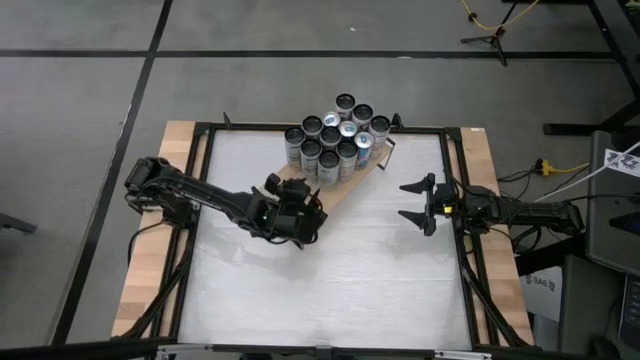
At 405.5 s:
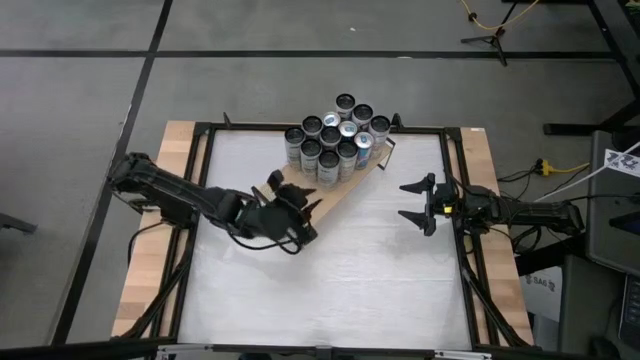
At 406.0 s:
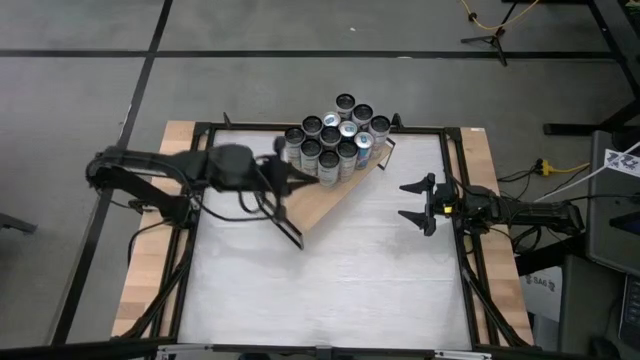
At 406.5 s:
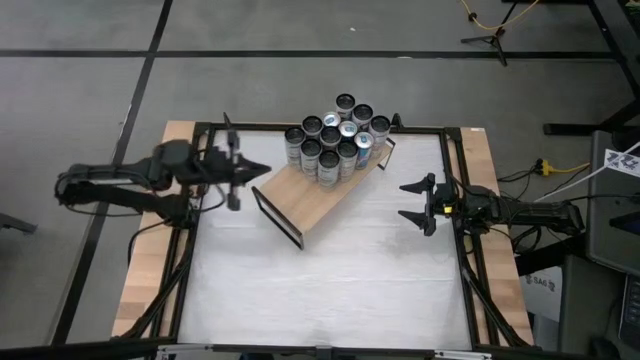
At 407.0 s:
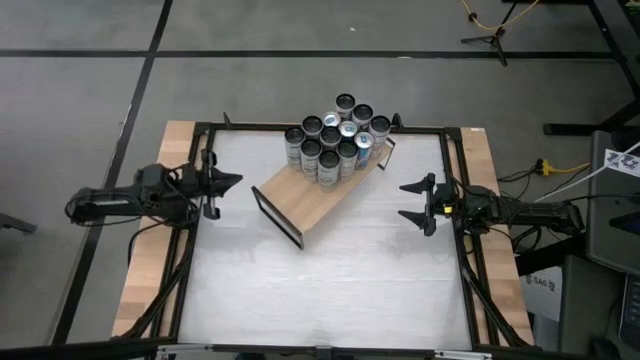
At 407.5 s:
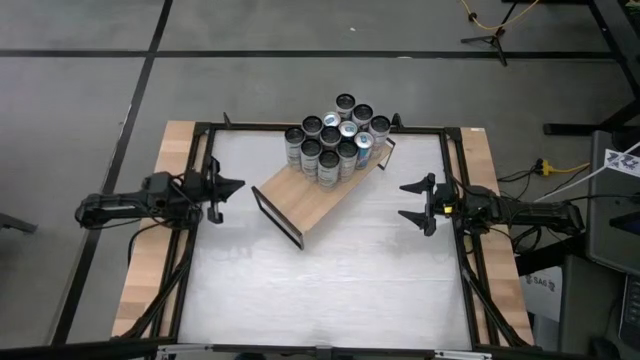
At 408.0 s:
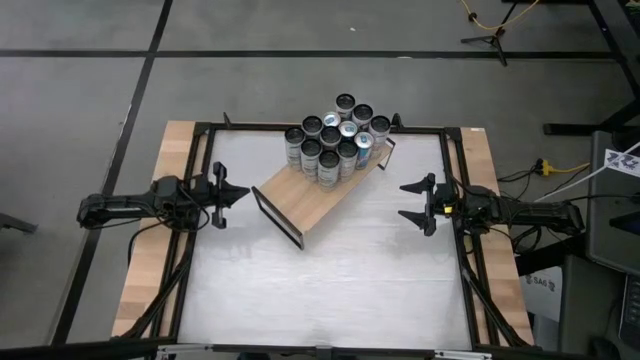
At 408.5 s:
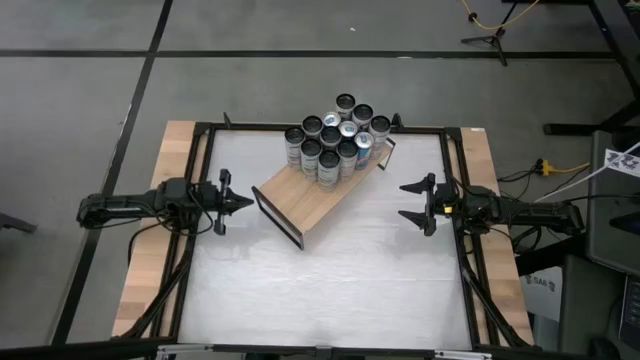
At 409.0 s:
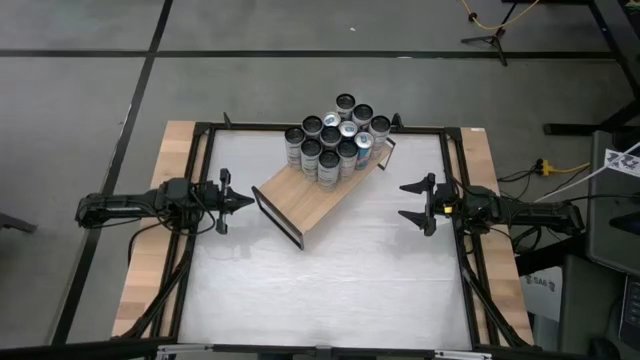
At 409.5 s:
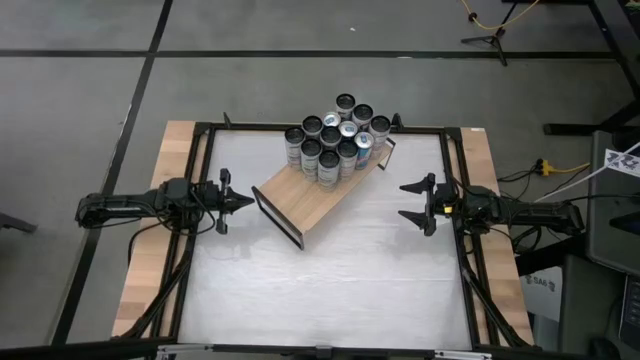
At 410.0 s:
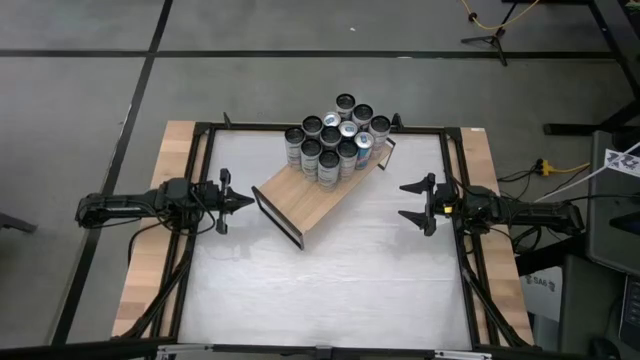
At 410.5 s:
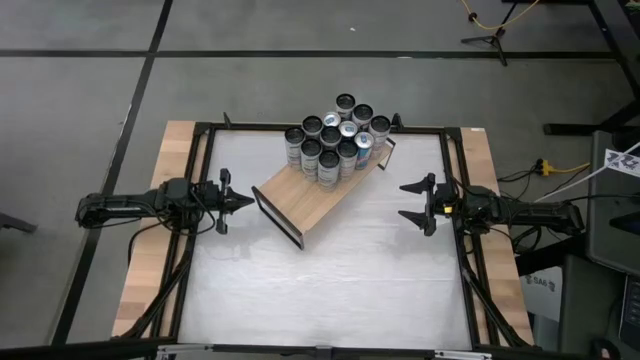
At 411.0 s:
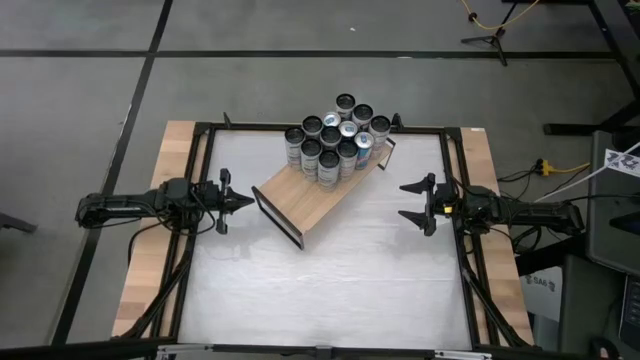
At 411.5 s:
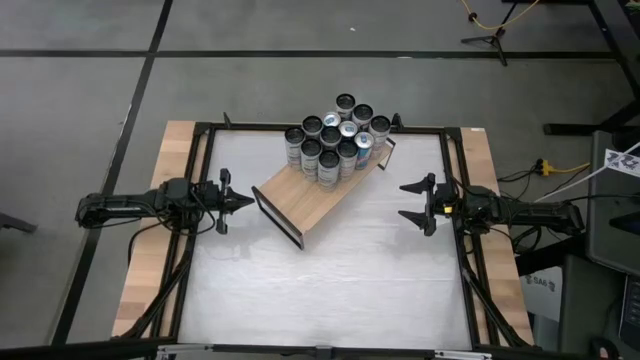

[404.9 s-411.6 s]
Task: Place canned beverage on shelf
Return to Home Position

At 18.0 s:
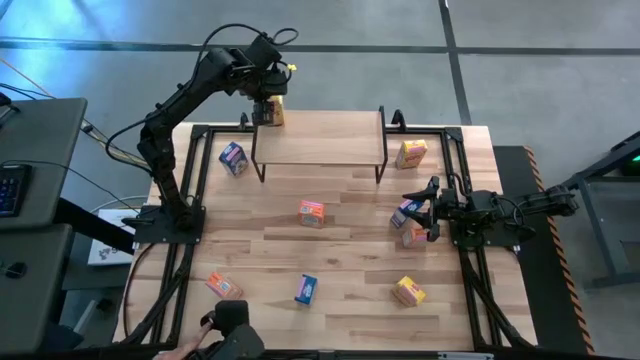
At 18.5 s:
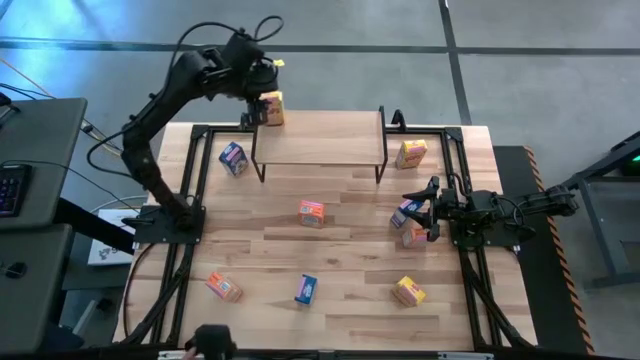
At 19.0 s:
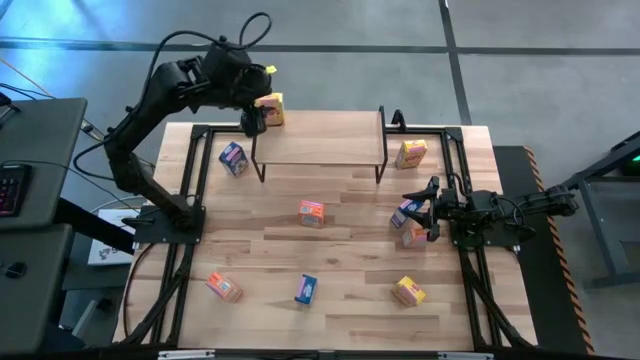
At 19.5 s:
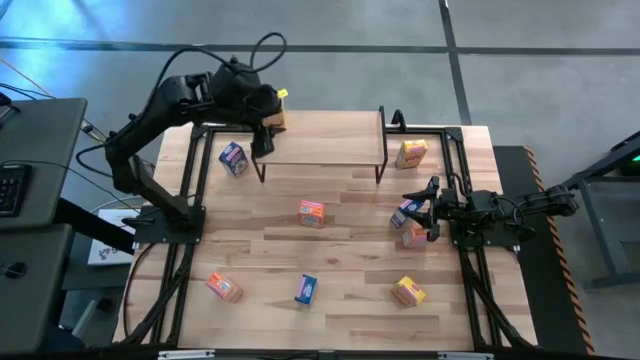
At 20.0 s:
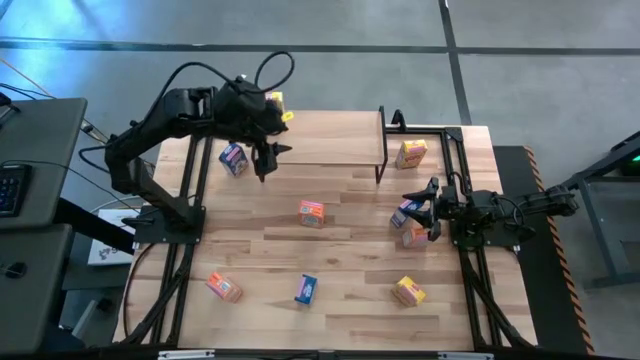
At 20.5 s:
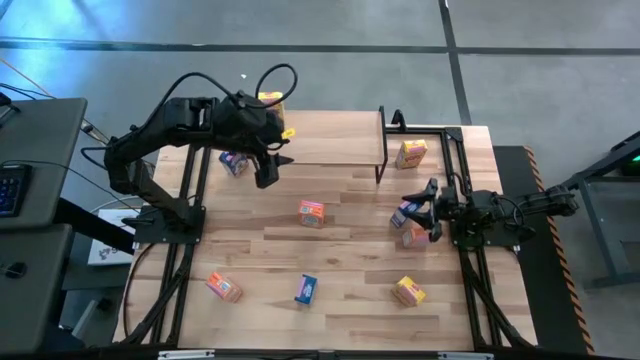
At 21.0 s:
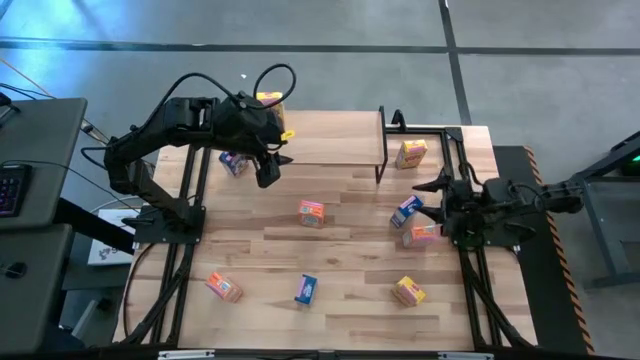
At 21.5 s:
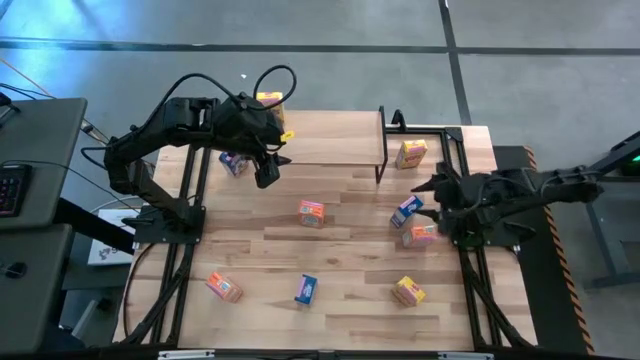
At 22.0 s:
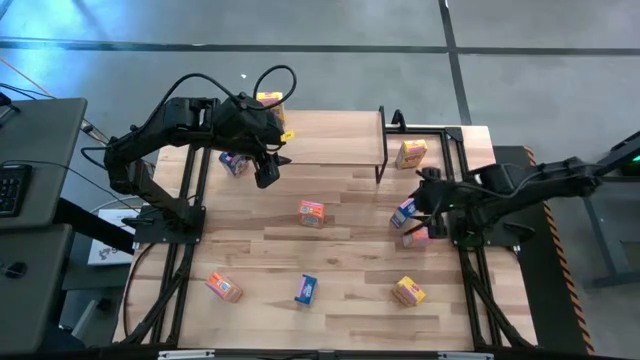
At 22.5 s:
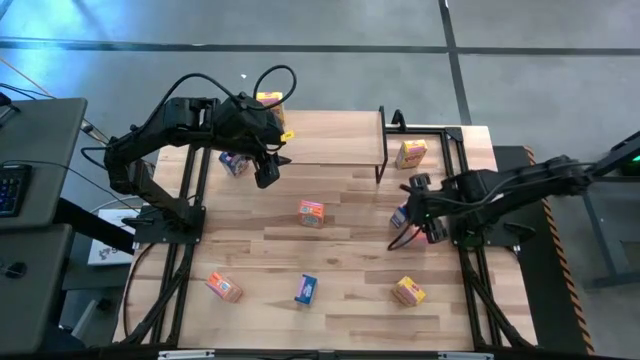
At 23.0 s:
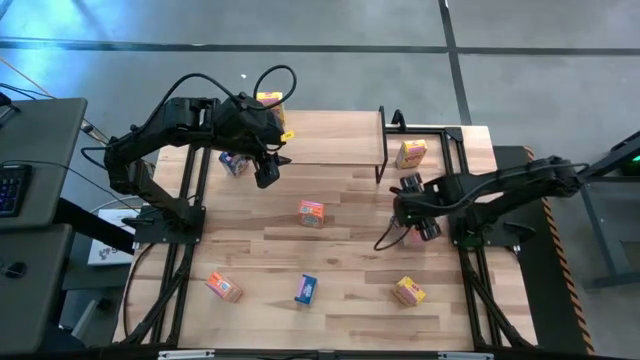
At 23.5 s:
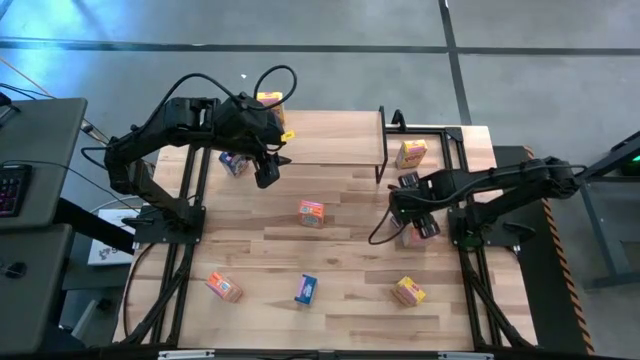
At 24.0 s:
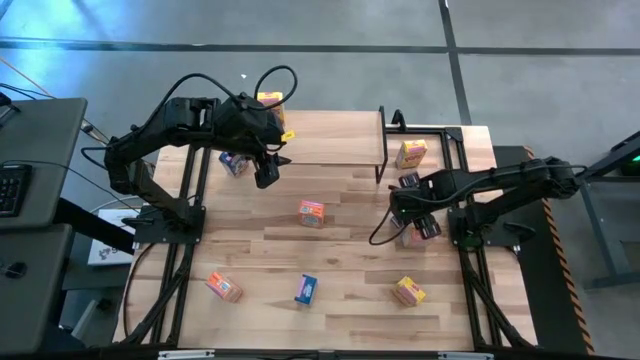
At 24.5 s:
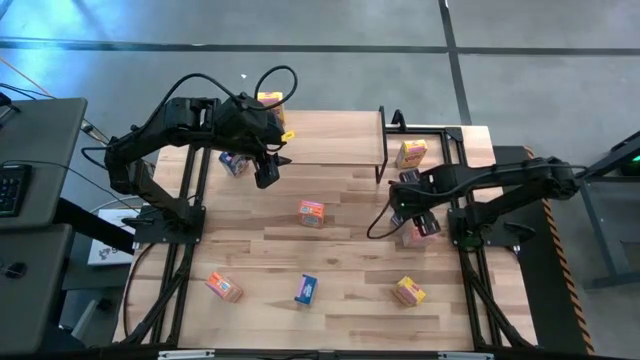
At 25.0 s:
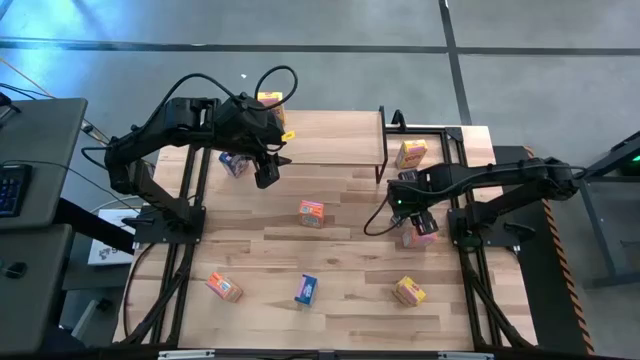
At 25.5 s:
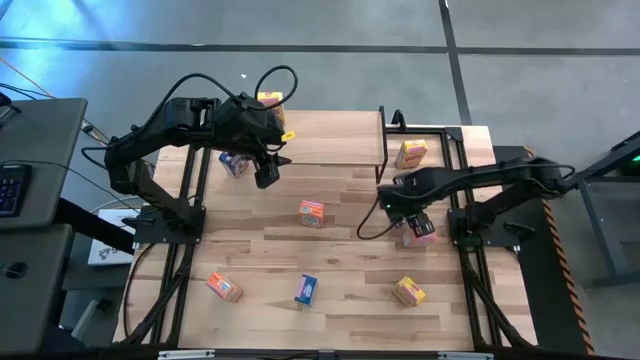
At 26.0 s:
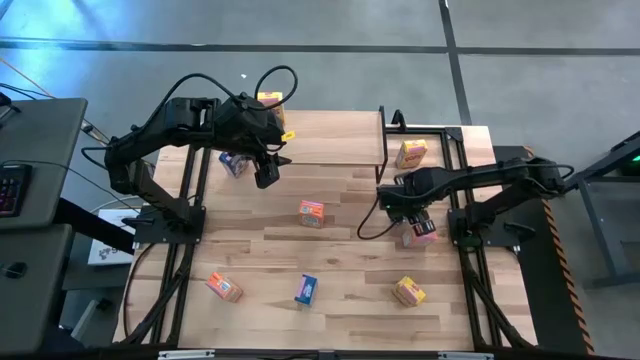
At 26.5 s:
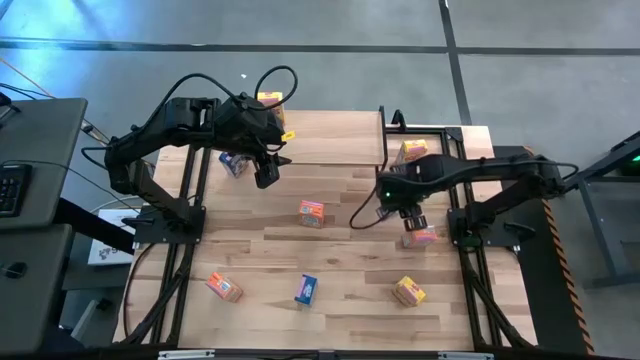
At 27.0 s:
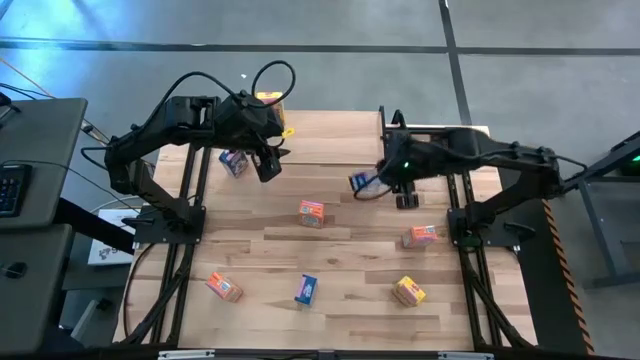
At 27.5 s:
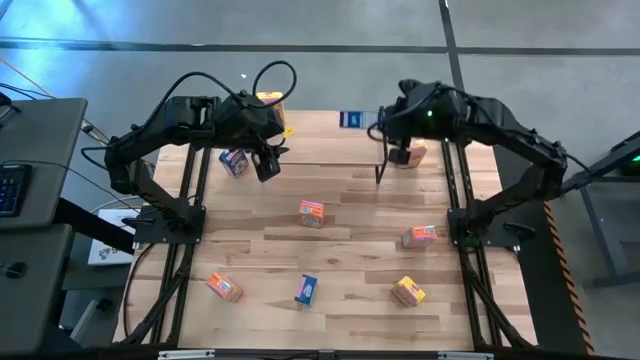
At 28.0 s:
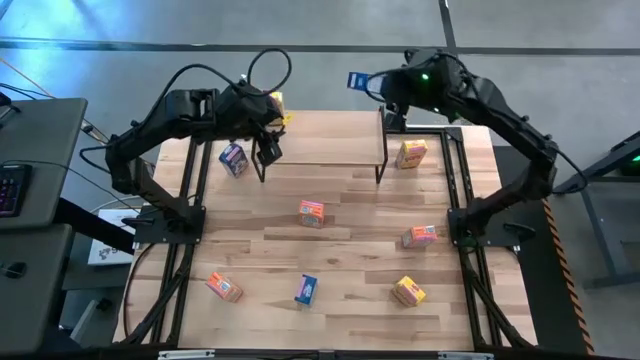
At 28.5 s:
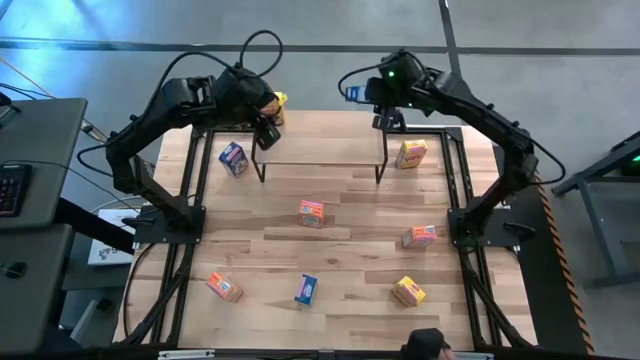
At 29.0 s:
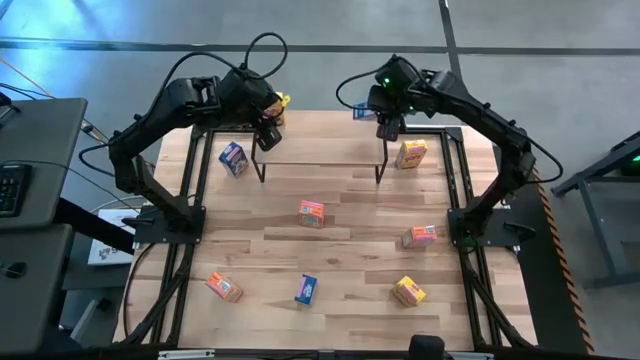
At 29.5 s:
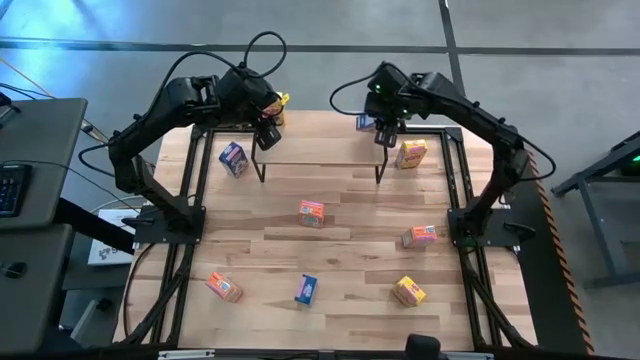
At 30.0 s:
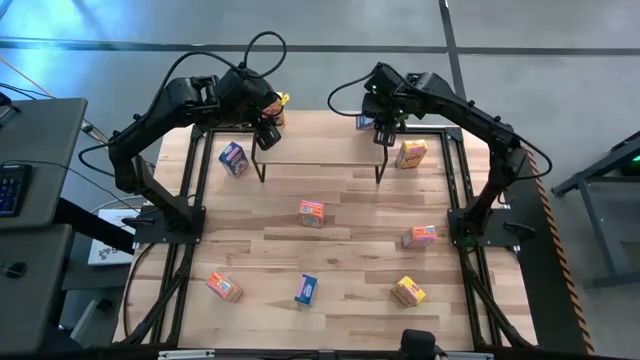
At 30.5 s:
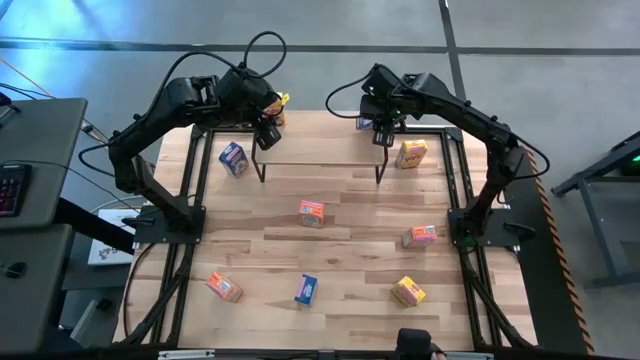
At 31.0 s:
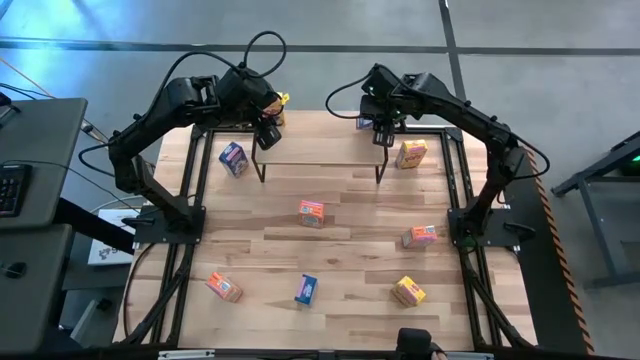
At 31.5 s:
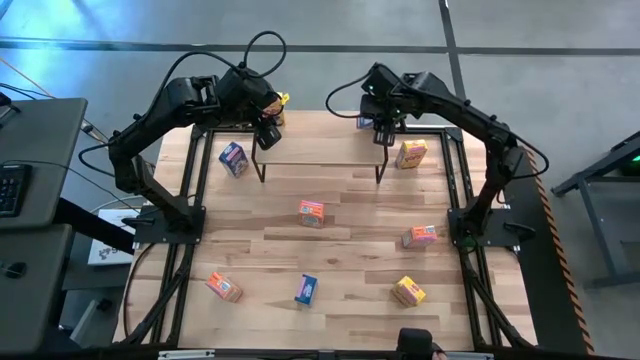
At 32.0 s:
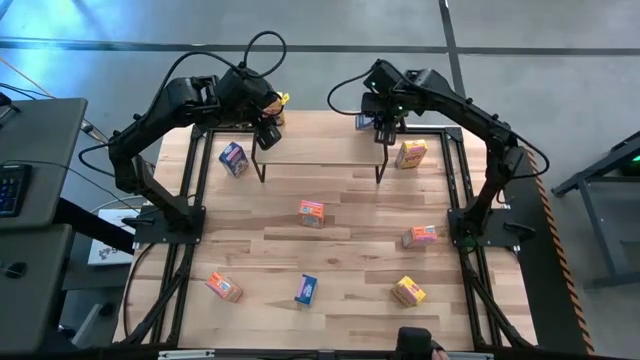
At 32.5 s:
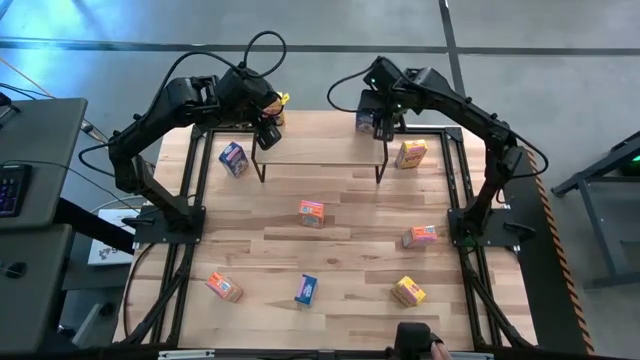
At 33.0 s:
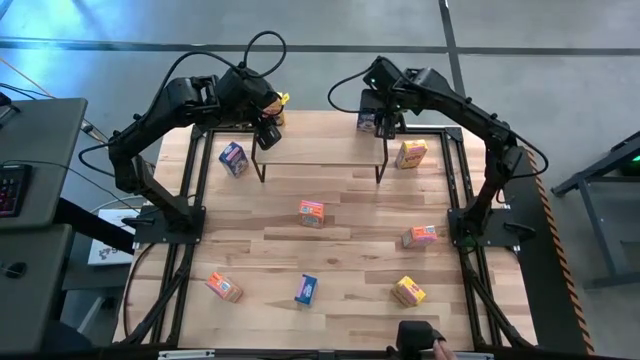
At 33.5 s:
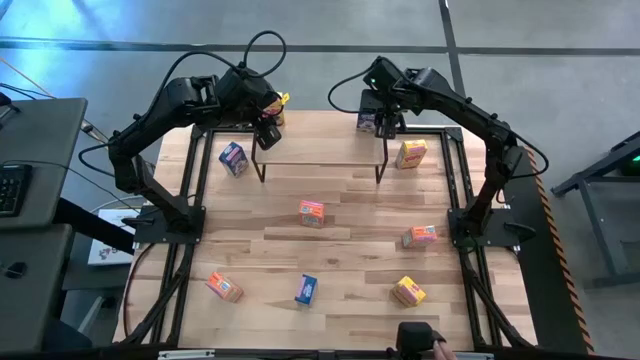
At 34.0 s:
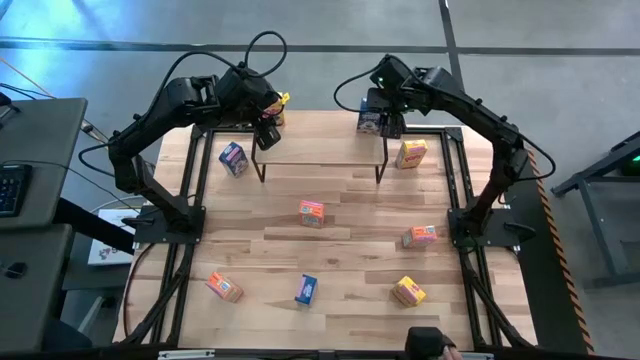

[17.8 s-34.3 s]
Task: Stack cereal on shelf
Put the middle right blue cereal box on the shelf
